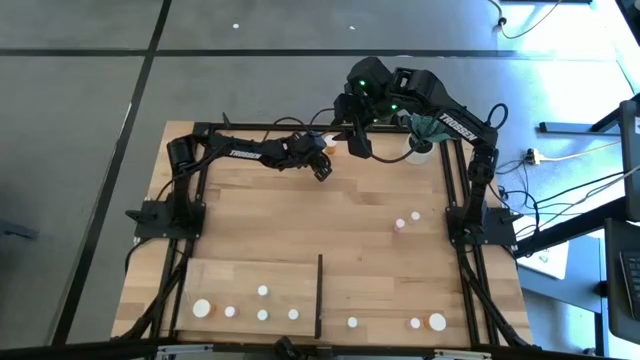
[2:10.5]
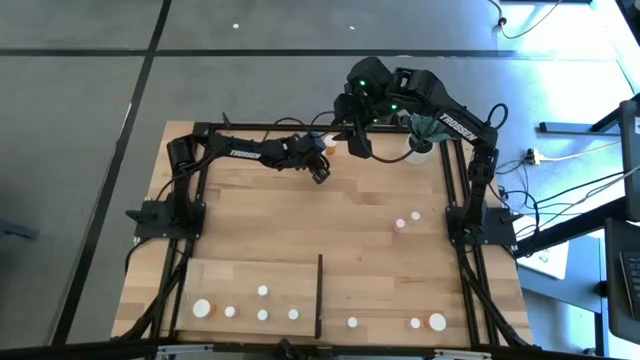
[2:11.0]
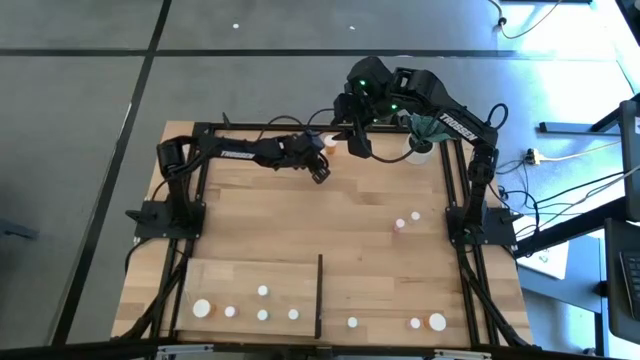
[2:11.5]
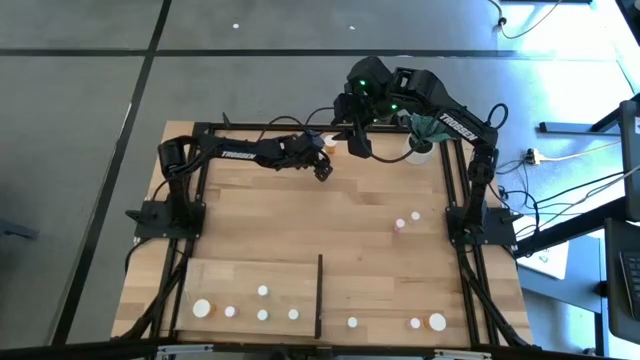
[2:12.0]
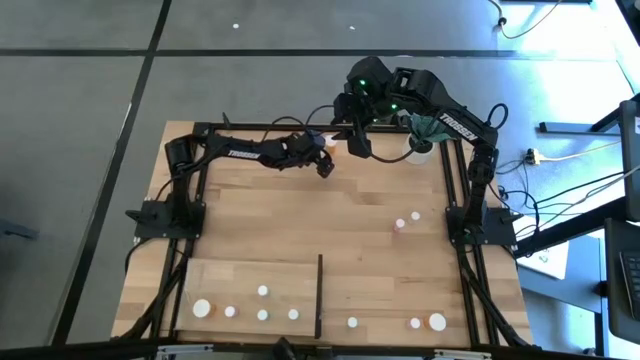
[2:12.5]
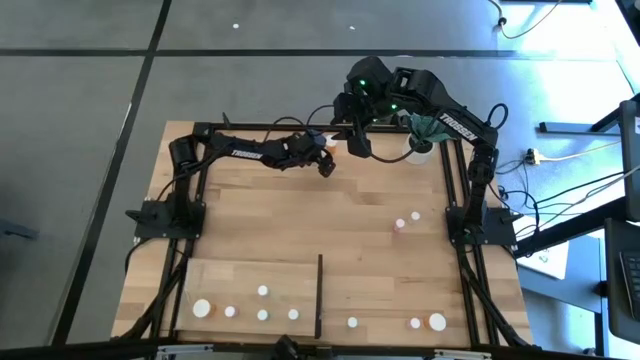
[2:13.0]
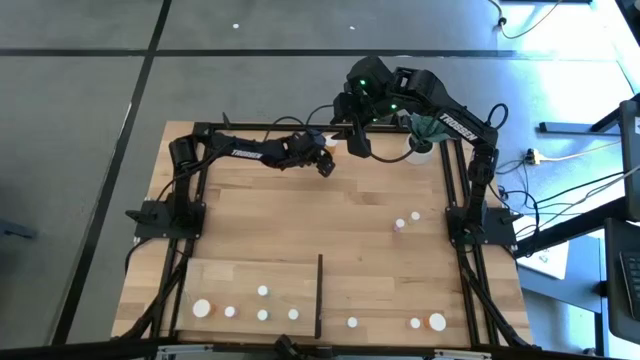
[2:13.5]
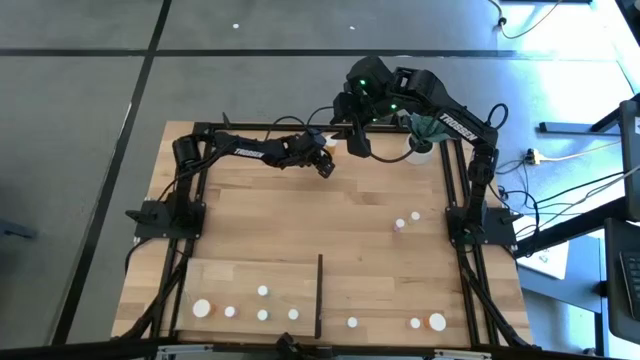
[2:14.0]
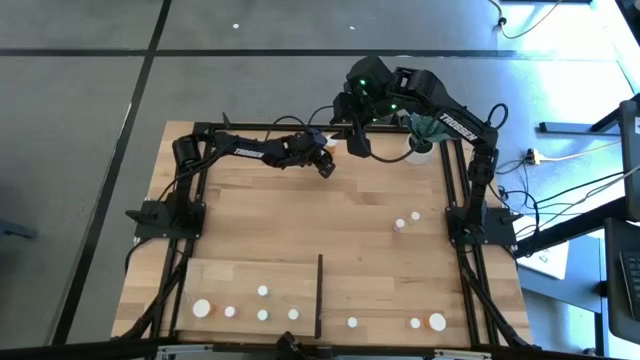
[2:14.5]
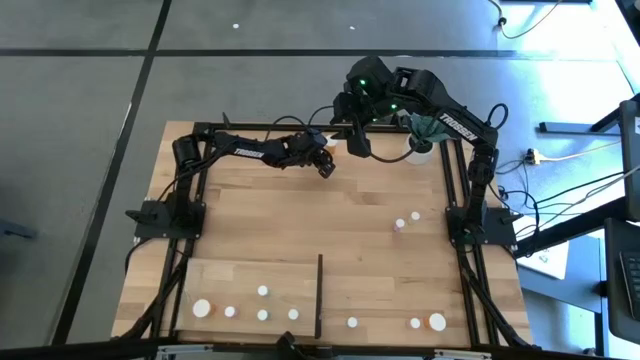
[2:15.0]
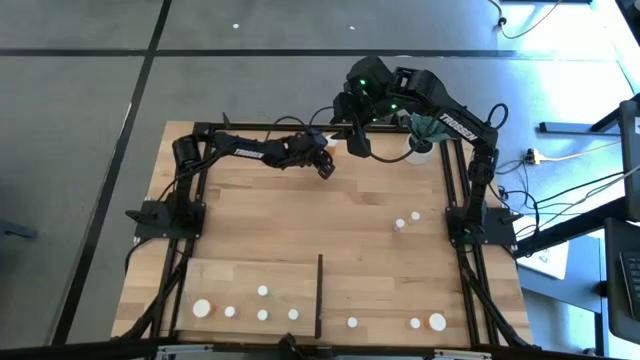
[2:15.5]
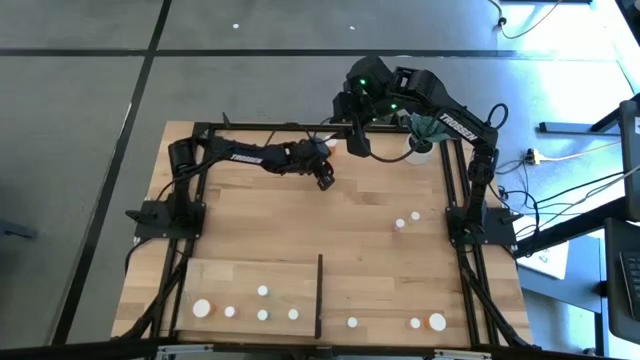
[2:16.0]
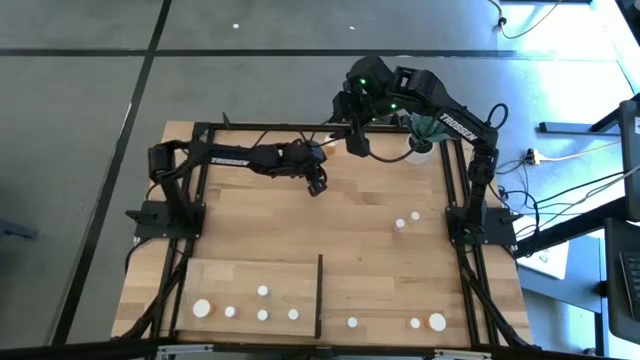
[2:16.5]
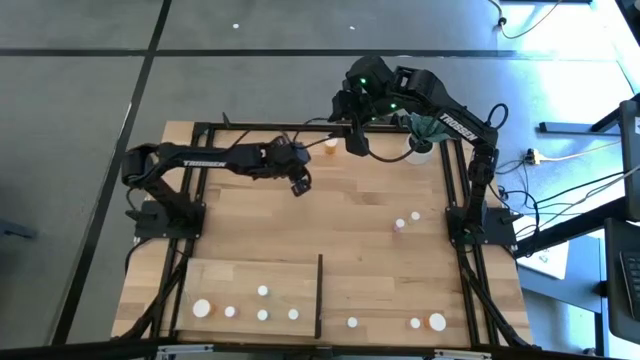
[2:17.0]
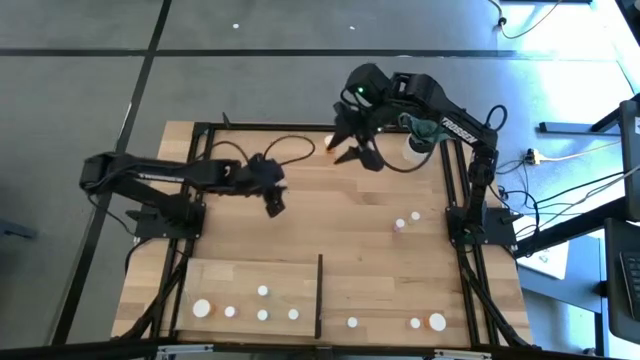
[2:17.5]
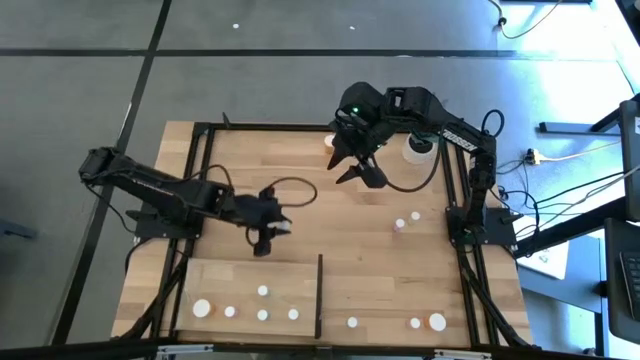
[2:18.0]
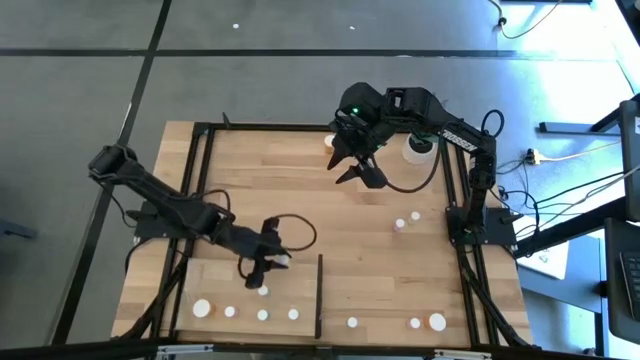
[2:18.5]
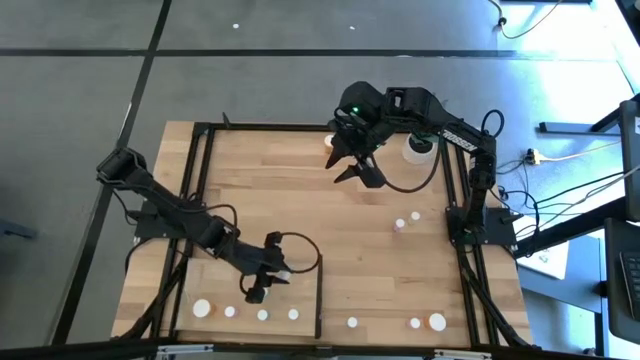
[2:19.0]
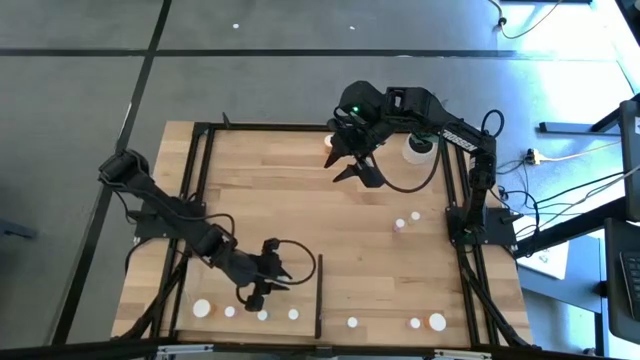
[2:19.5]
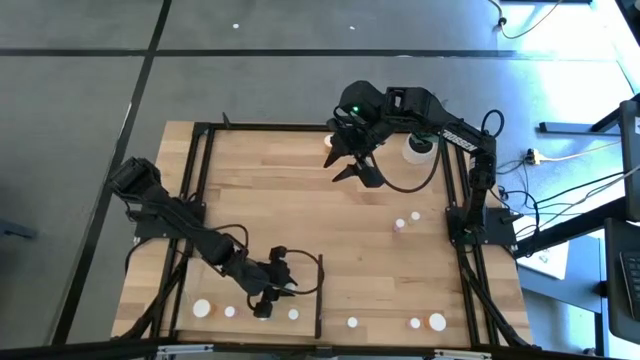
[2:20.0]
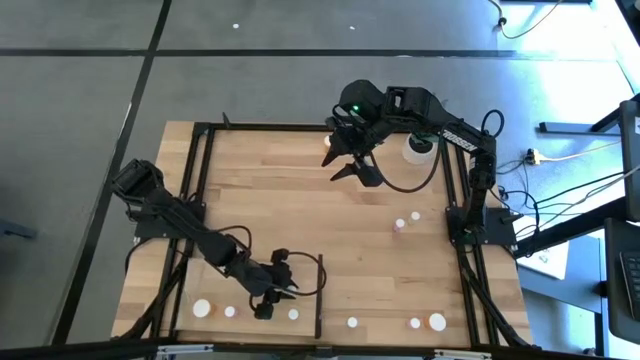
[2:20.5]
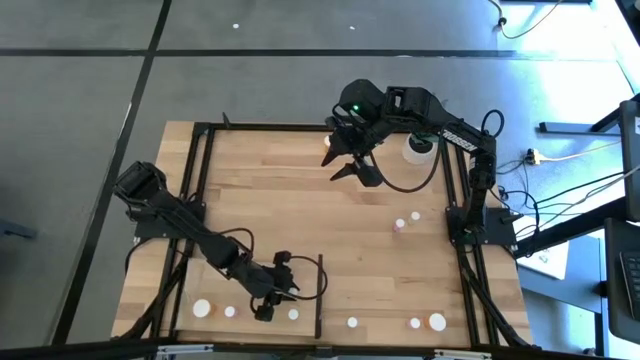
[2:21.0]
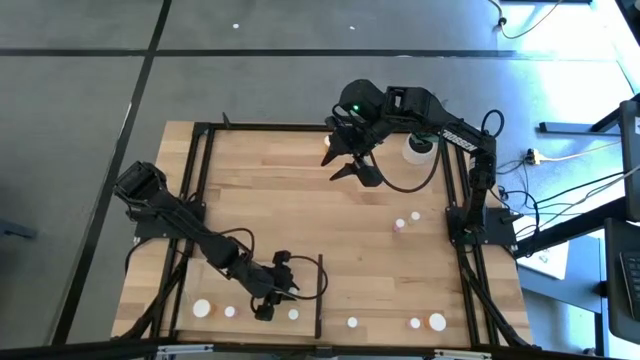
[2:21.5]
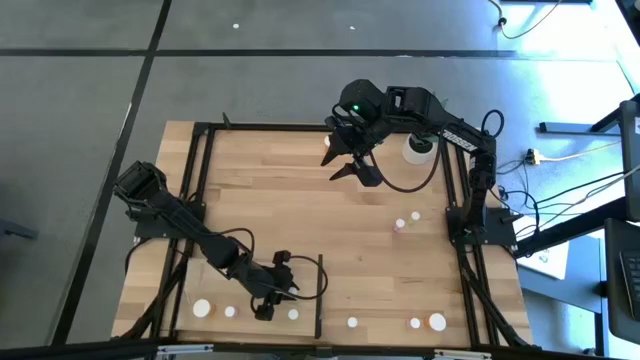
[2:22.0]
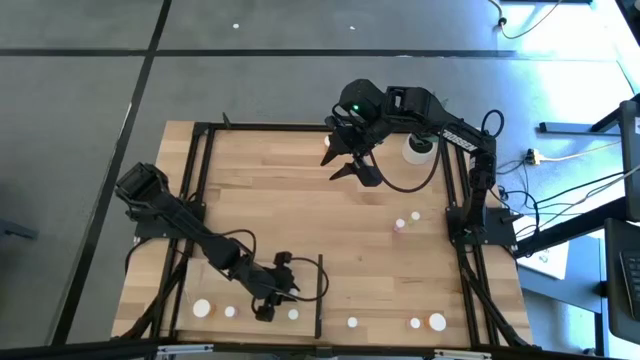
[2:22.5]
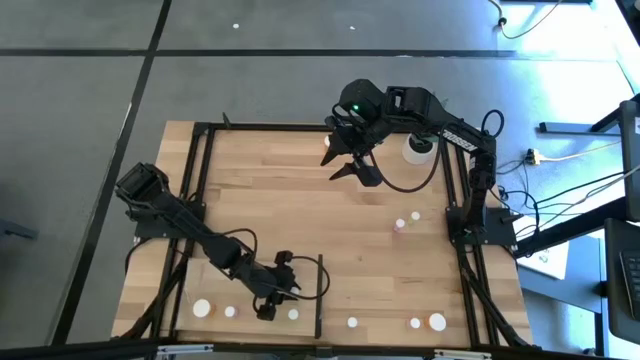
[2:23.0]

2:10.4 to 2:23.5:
Task: Pick and place medicine bottles onto shelf by color
Put the top yellow pill bottle on the shelf aligned with the other yellow pill bottle

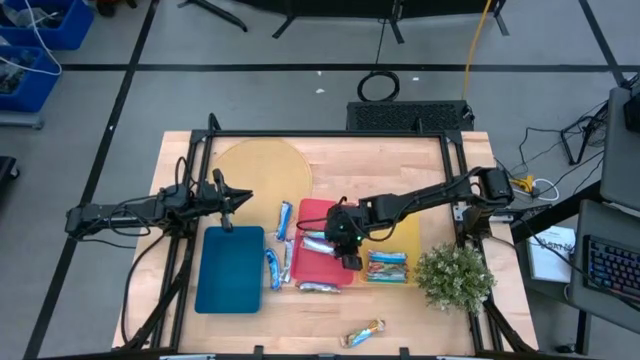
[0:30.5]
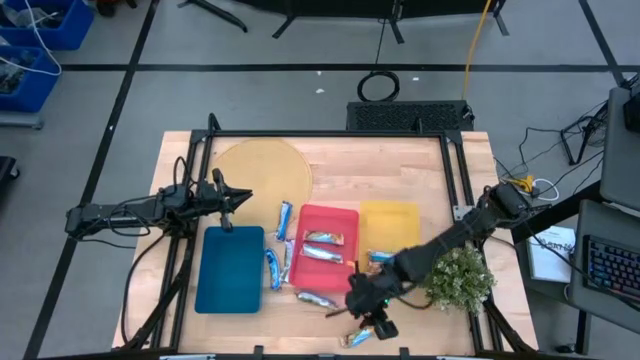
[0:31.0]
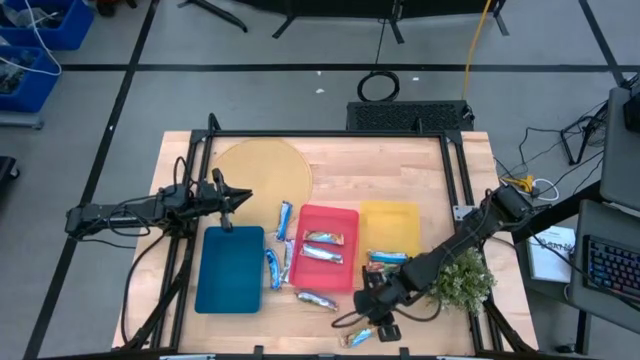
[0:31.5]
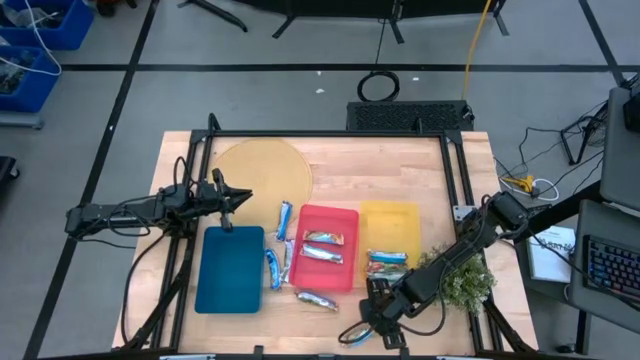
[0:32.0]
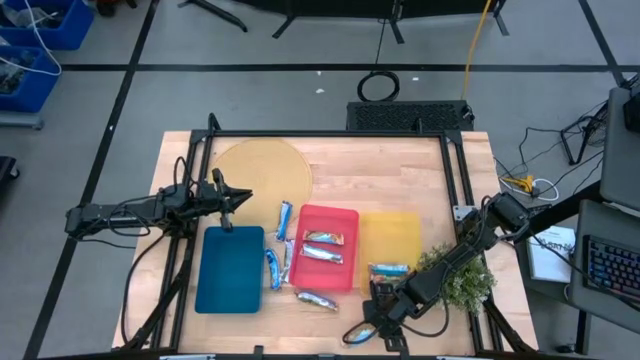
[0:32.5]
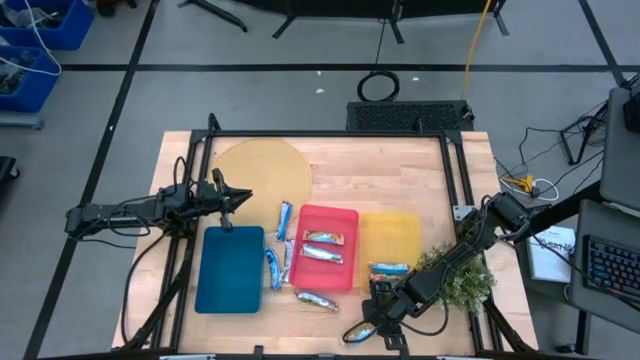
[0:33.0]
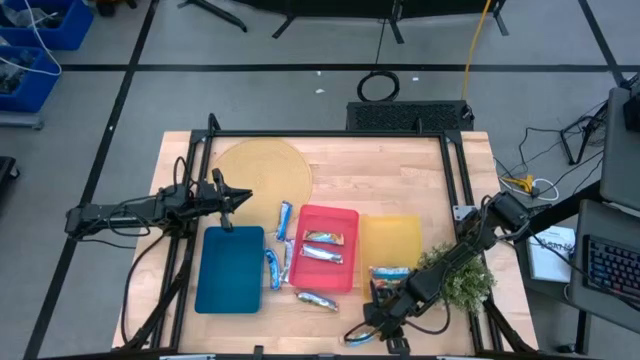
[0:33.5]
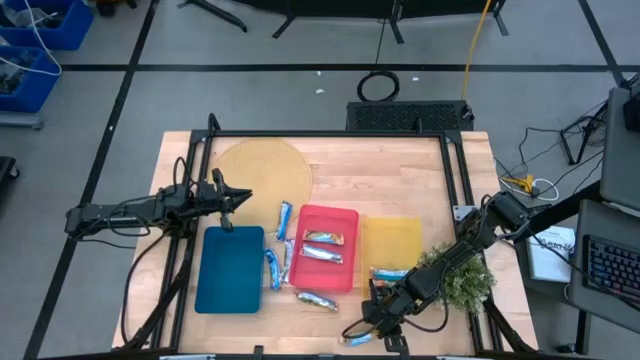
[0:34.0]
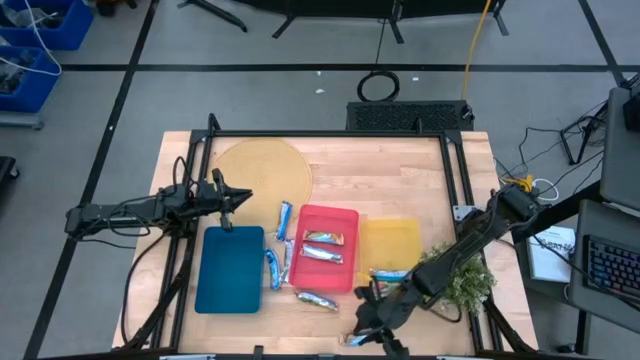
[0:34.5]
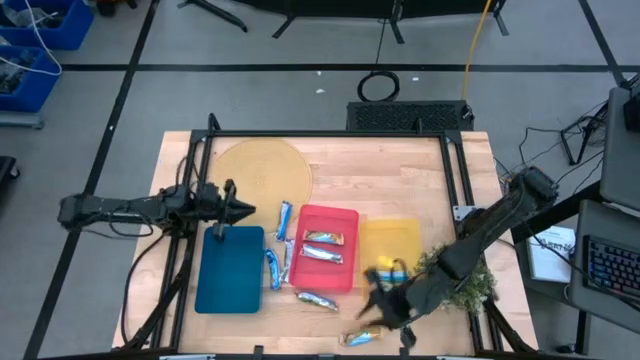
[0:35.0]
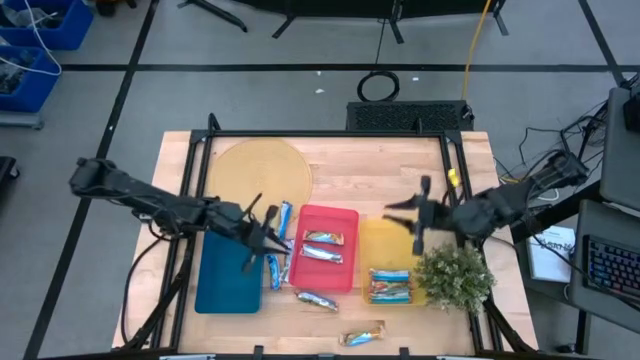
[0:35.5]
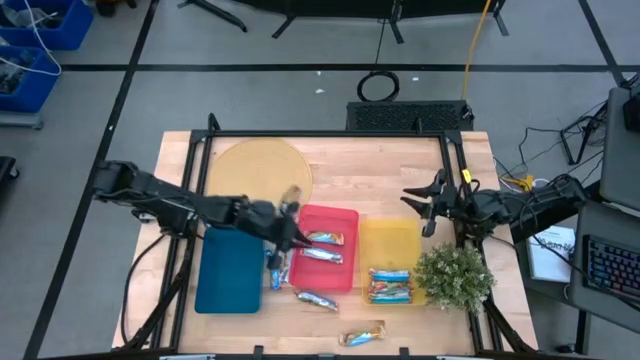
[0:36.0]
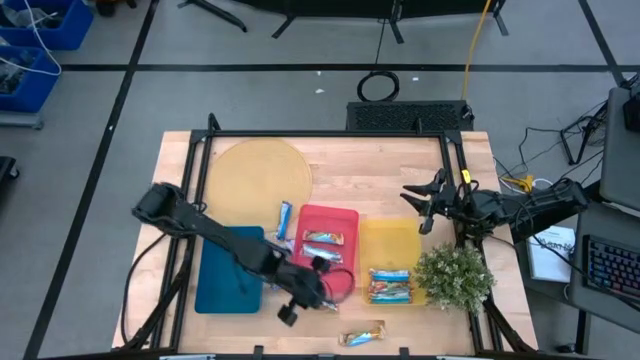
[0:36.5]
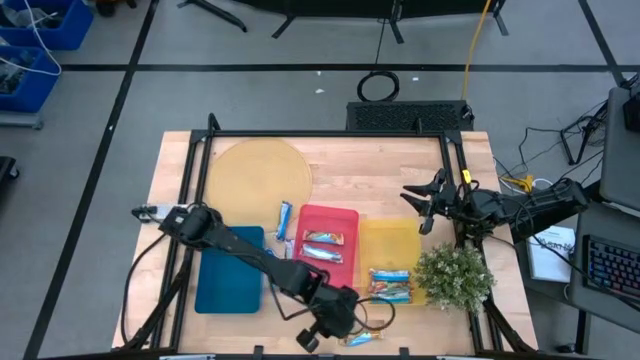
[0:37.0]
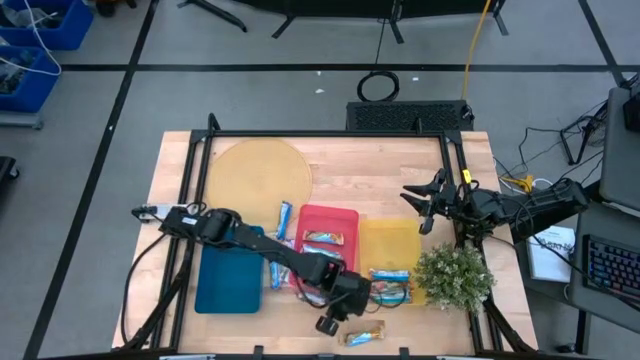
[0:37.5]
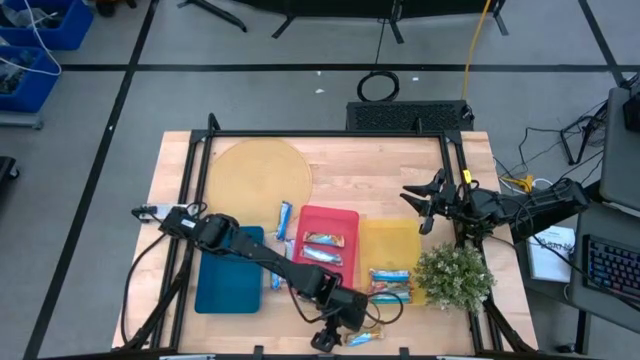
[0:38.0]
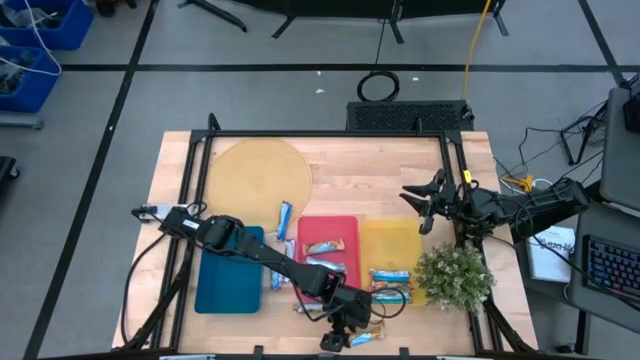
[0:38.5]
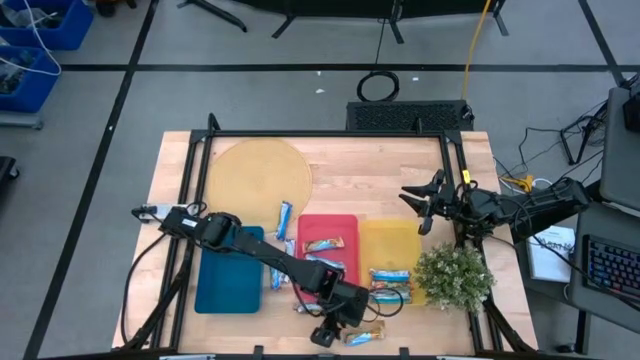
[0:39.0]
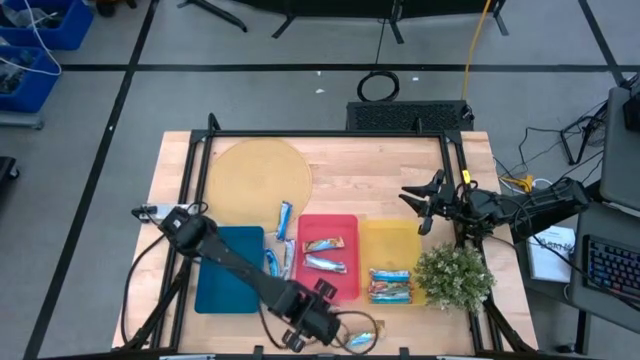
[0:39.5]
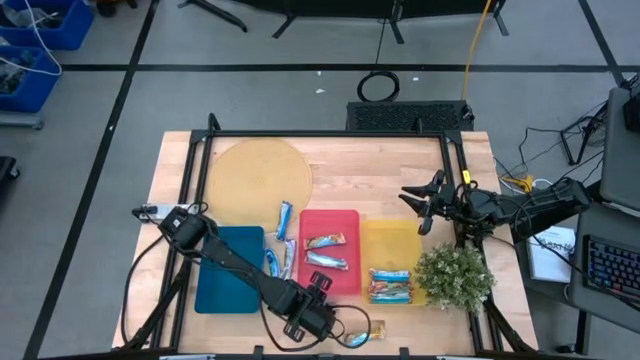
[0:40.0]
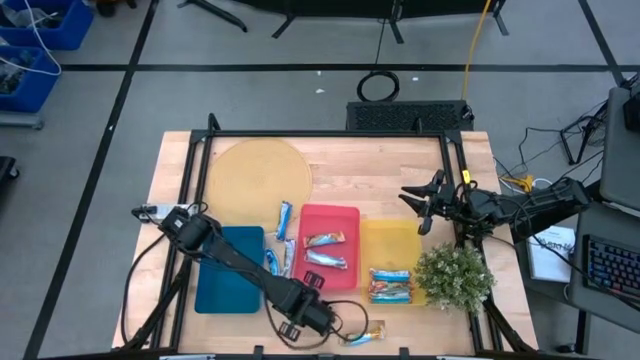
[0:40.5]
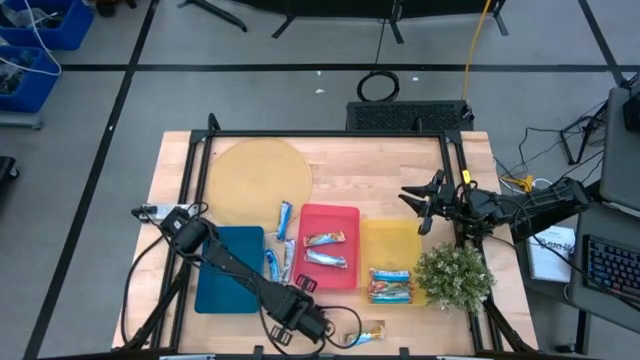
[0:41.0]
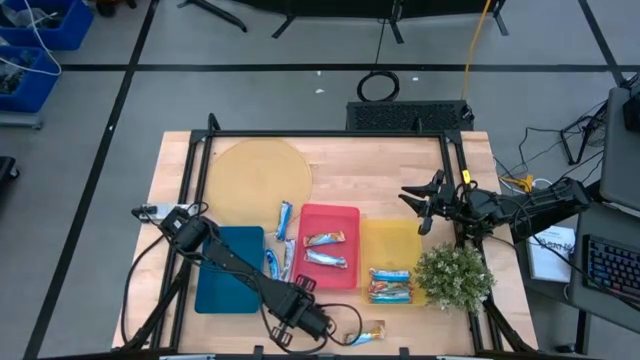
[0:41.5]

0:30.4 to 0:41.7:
Task: Pick and place Granola Bars by type
Put the yellow granola bar into the red bin
